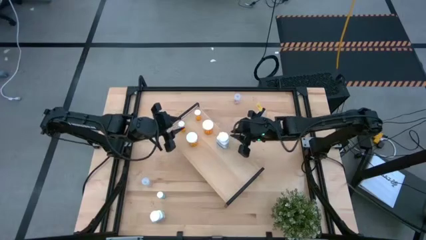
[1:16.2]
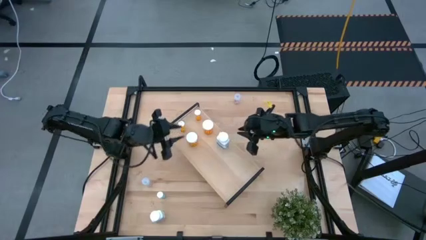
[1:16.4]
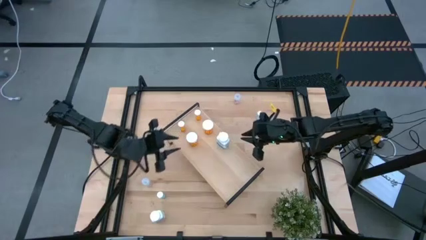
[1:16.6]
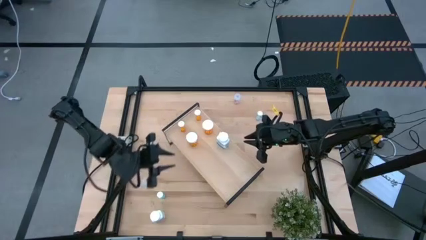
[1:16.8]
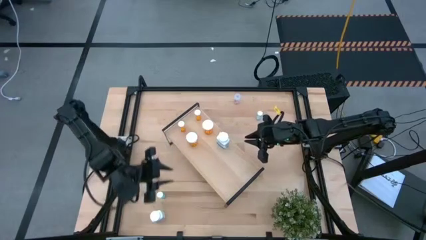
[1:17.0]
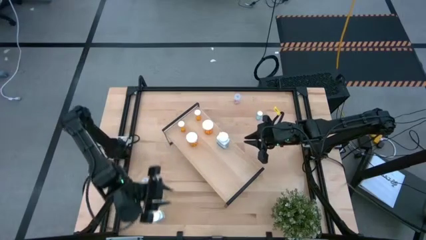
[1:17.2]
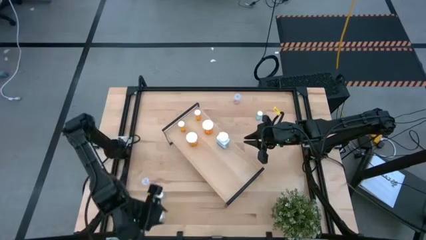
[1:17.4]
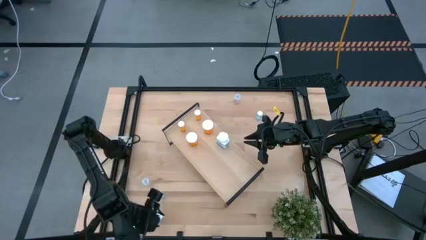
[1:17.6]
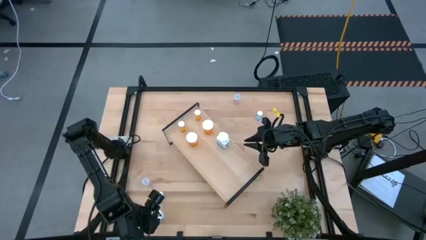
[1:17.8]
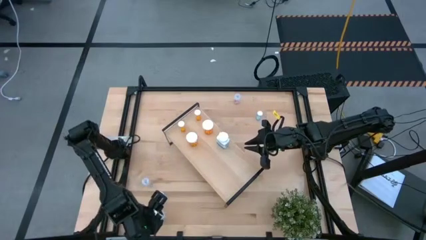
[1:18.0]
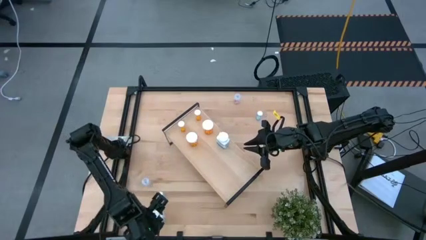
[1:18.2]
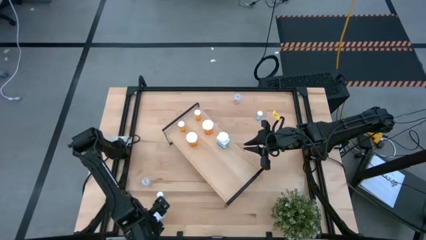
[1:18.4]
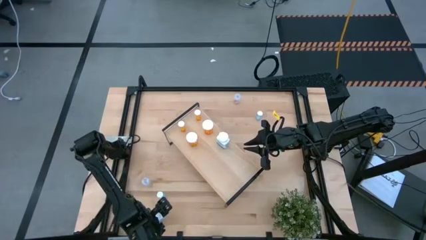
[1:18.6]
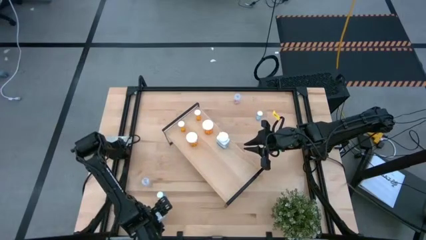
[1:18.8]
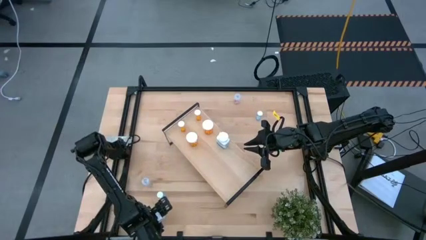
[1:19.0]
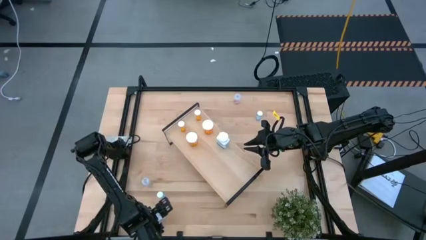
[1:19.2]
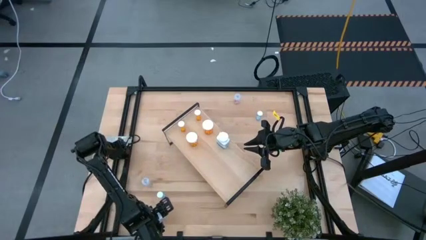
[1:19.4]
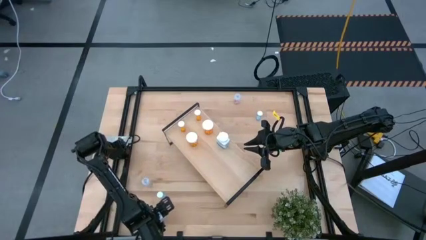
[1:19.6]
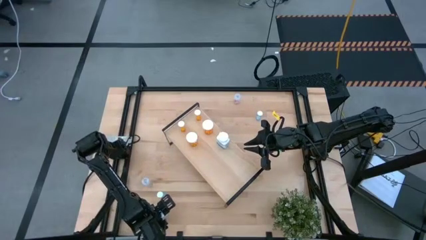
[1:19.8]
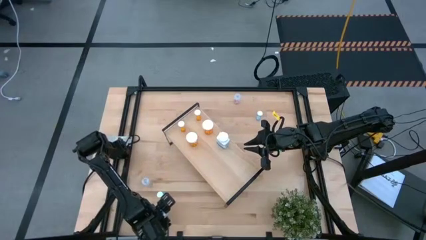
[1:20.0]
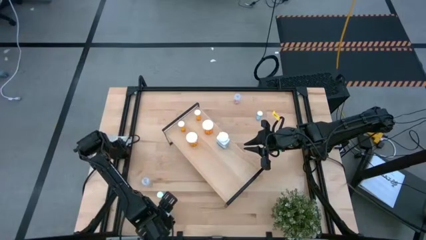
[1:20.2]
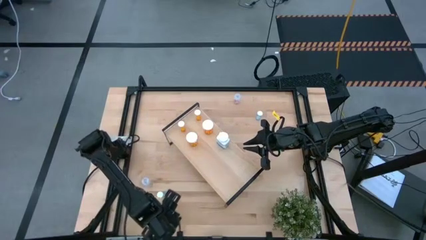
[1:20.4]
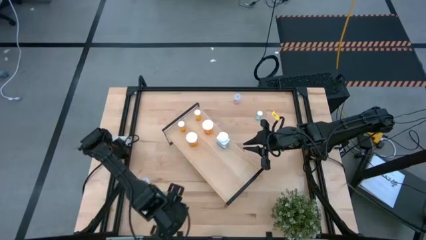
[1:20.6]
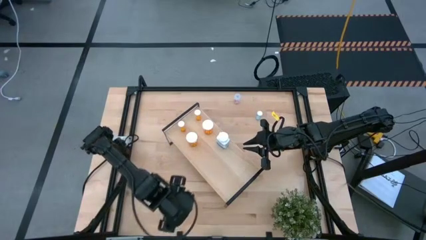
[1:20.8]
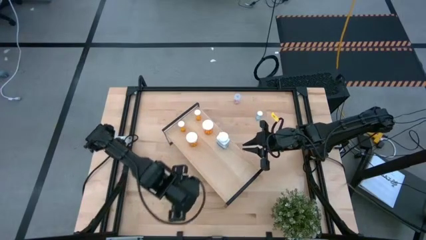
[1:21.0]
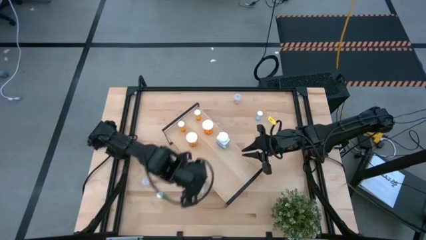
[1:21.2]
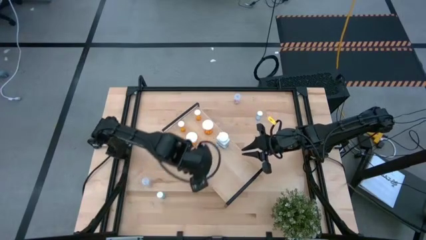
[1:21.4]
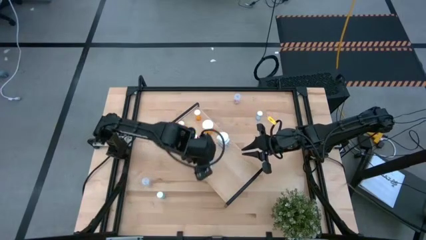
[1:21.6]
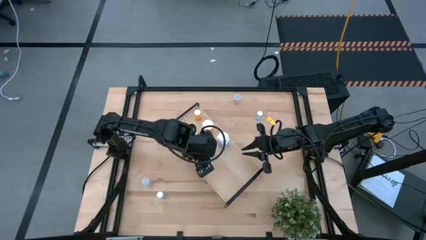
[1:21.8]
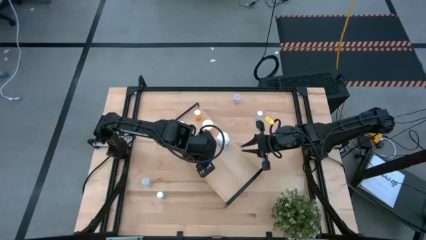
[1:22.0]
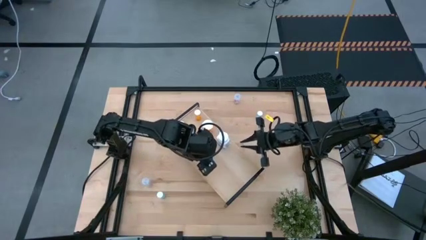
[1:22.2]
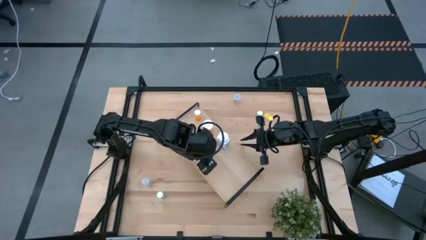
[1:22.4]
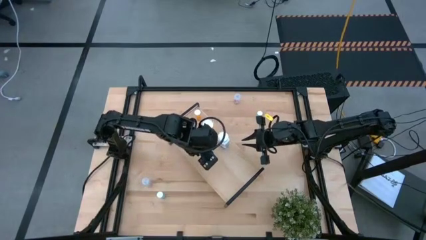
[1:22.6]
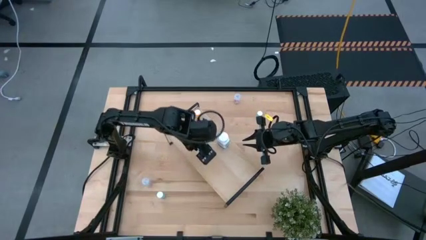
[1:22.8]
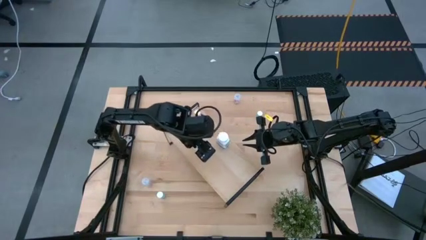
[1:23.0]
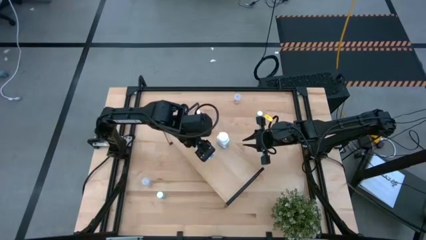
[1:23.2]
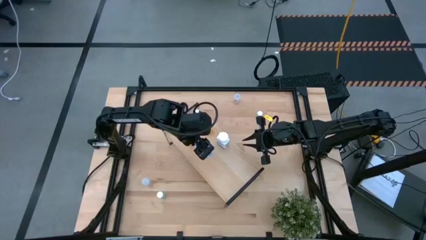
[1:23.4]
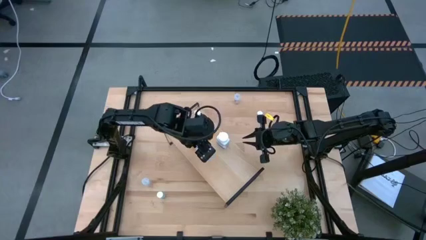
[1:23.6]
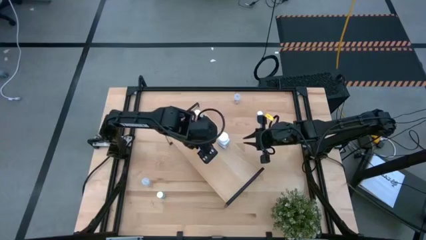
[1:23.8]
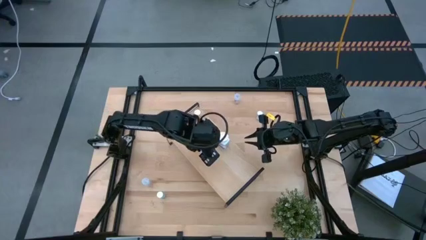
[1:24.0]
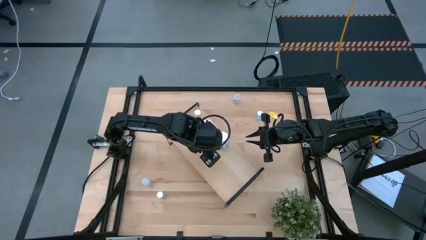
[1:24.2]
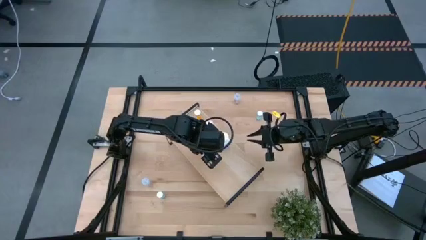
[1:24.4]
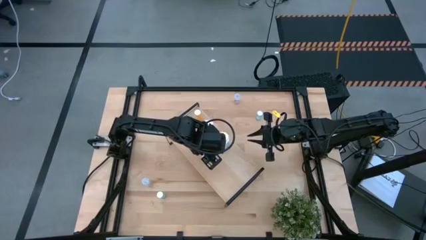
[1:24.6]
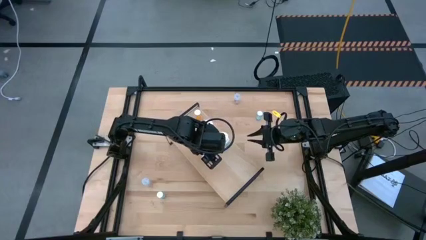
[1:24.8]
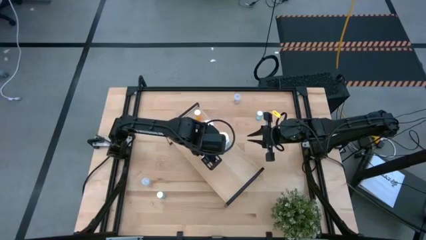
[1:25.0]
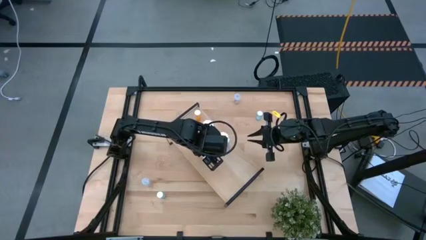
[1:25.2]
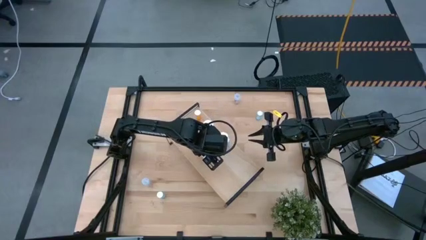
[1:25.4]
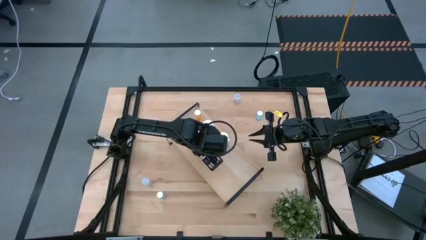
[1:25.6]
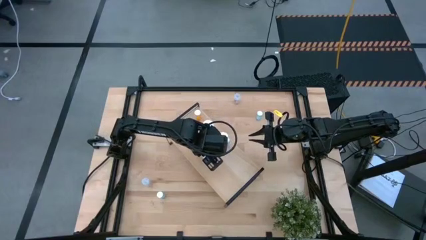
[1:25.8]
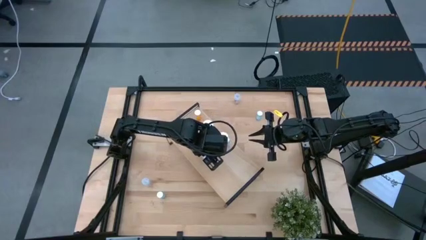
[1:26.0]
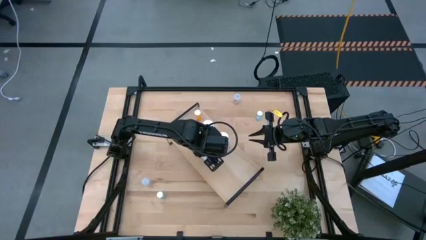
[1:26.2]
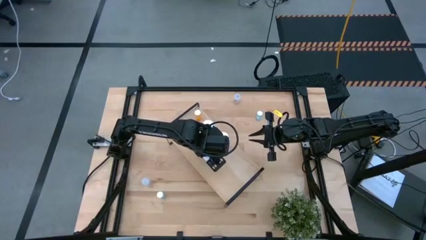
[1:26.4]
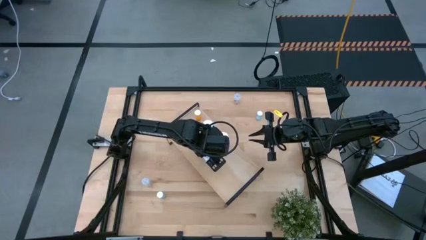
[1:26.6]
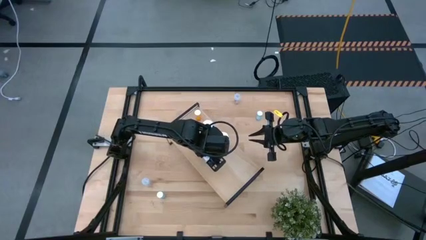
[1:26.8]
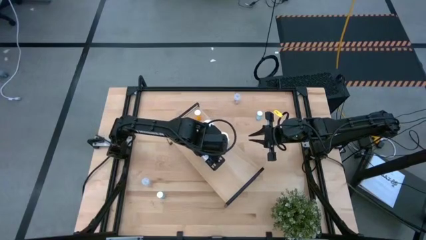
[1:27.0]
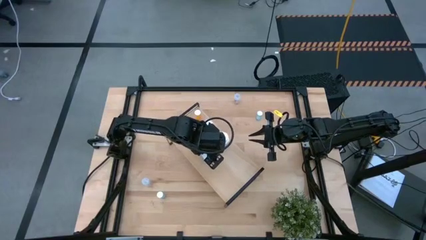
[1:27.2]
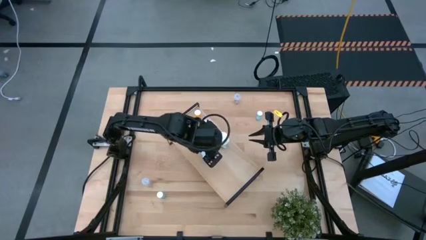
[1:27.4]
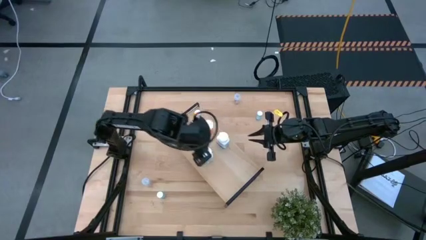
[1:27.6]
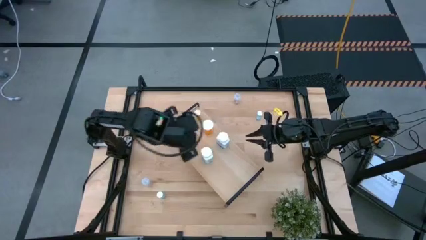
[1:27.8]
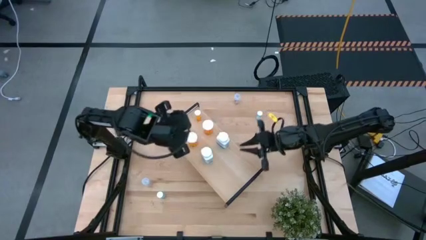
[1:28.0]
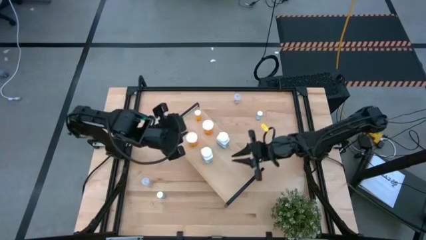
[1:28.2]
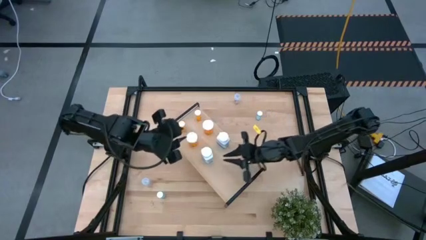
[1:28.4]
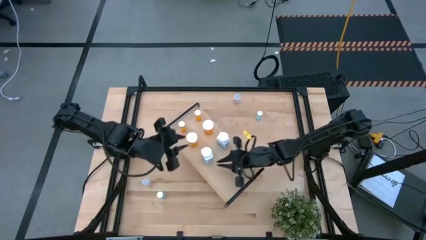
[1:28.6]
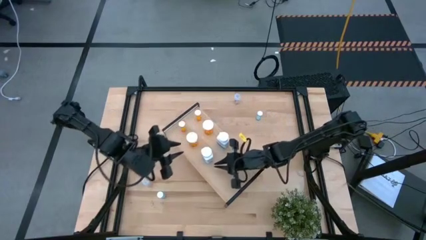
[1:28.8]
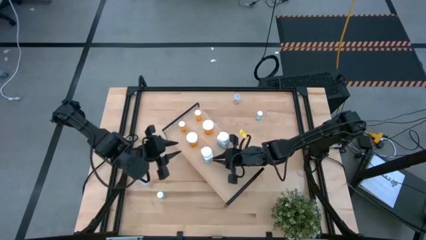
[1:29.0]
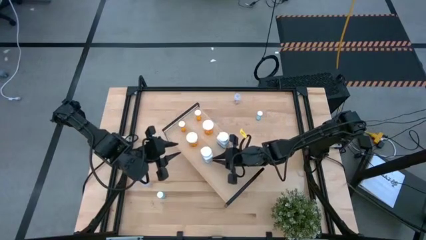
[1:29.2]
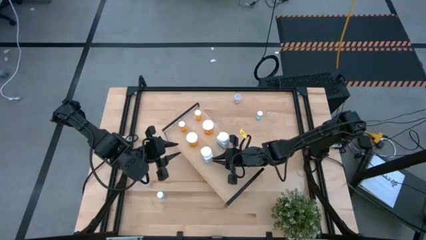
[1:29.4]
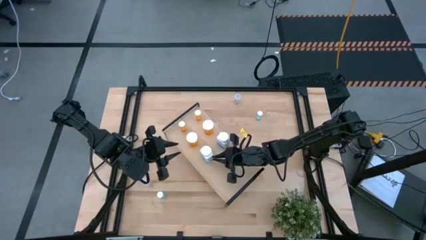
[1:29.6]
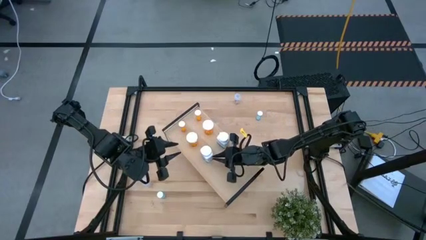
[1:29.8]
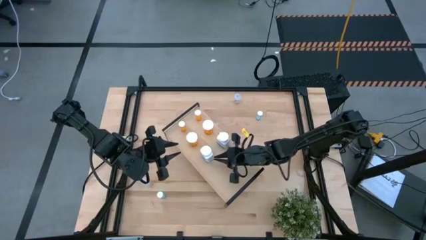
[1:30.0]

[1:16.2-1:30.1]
Task: Pick and place medicine bottles onto shelf by color
Put the white pill bottle on the shelf aligned with the white pill bottle
